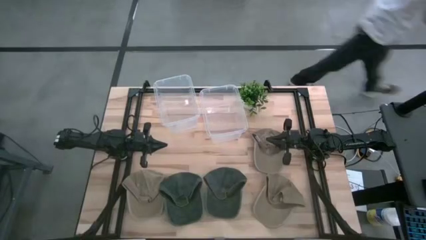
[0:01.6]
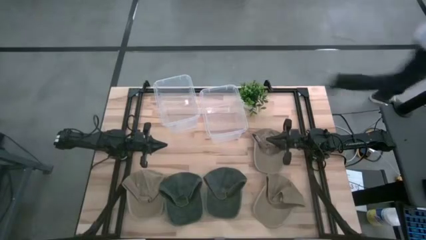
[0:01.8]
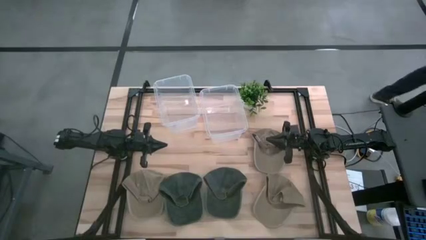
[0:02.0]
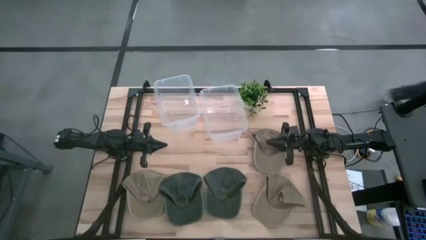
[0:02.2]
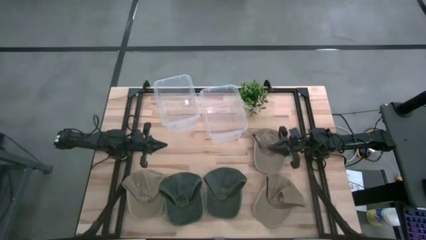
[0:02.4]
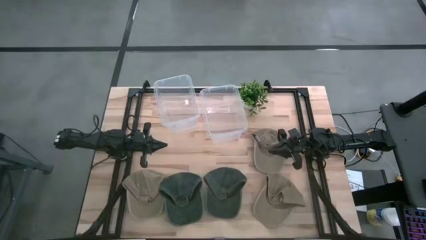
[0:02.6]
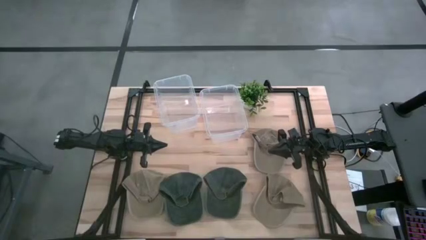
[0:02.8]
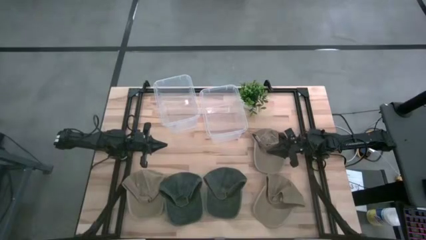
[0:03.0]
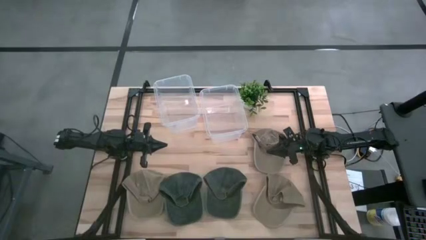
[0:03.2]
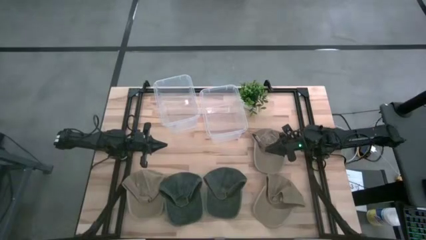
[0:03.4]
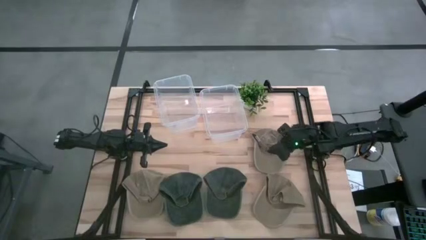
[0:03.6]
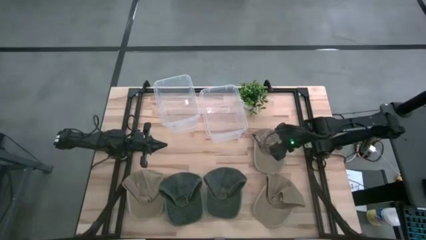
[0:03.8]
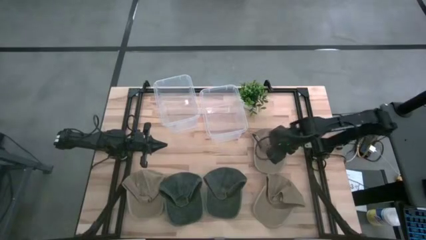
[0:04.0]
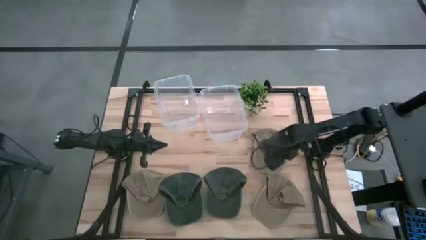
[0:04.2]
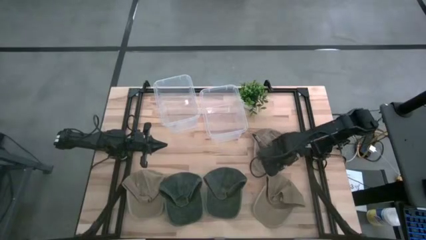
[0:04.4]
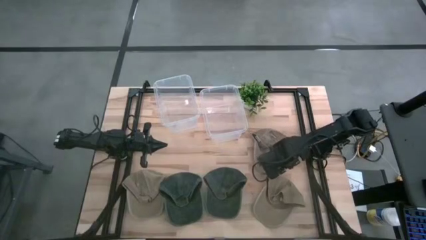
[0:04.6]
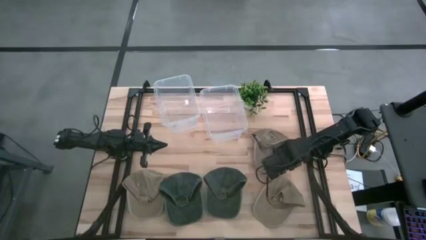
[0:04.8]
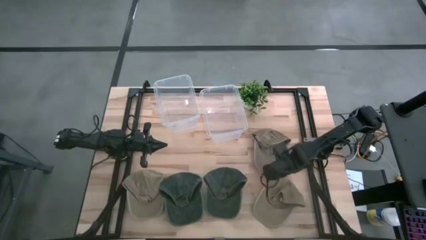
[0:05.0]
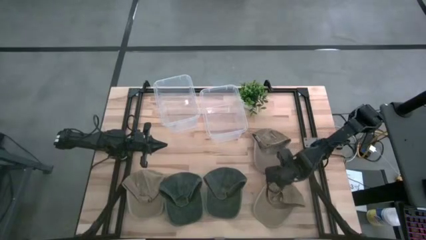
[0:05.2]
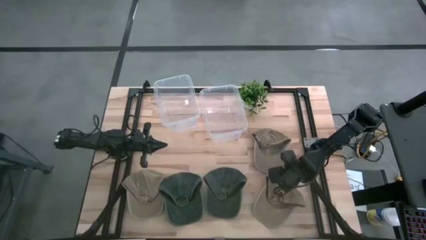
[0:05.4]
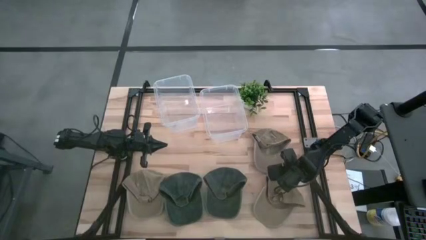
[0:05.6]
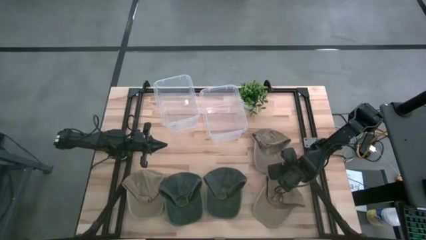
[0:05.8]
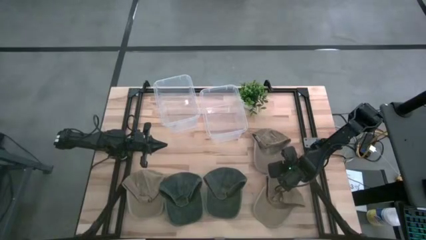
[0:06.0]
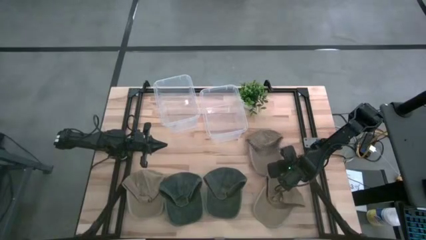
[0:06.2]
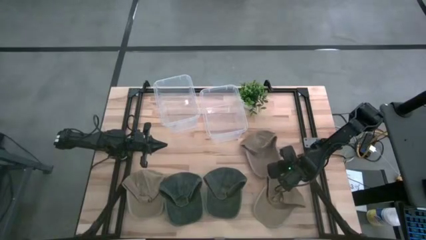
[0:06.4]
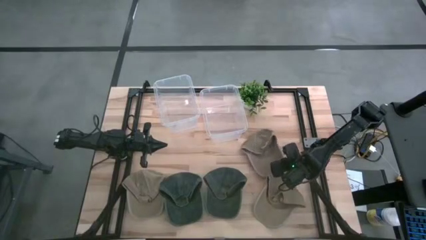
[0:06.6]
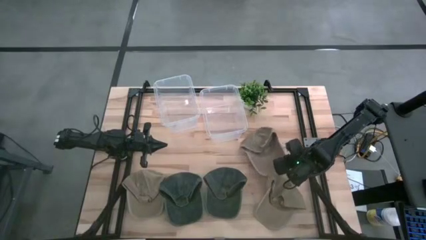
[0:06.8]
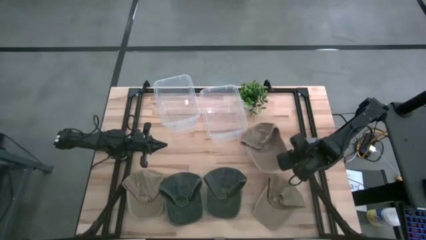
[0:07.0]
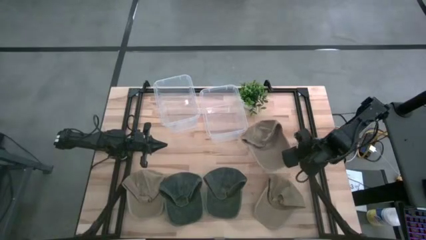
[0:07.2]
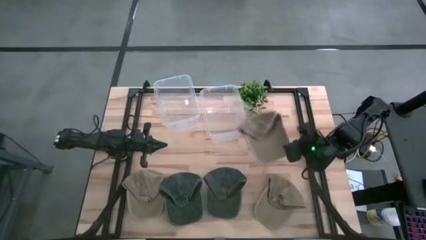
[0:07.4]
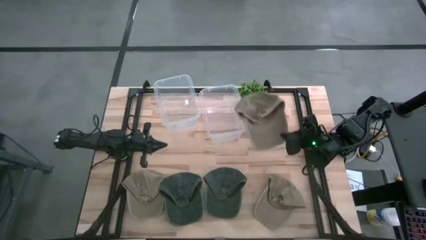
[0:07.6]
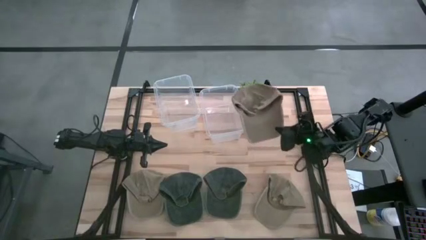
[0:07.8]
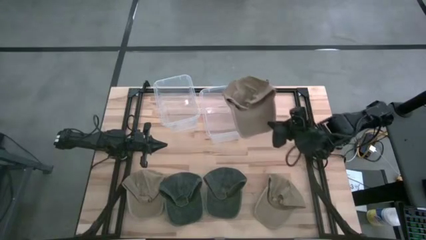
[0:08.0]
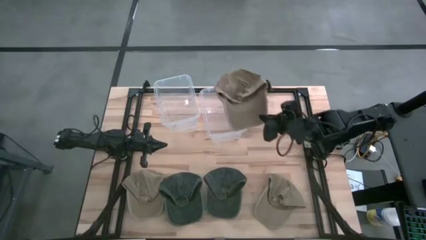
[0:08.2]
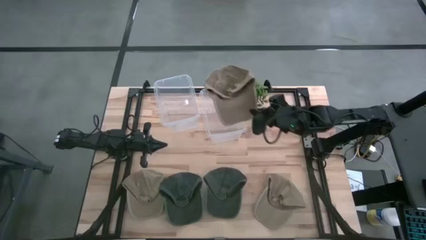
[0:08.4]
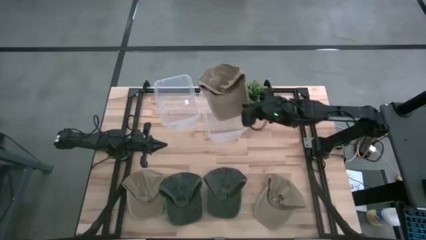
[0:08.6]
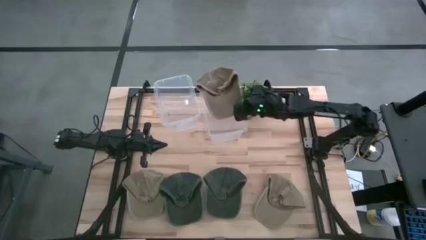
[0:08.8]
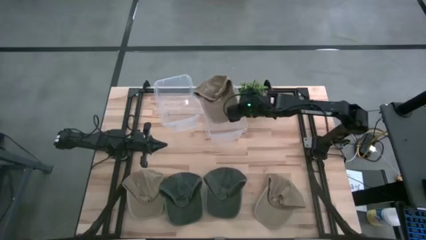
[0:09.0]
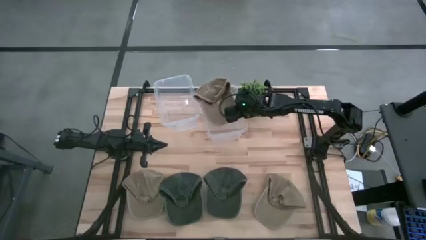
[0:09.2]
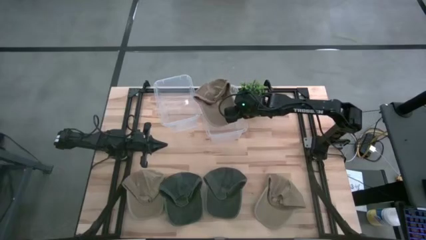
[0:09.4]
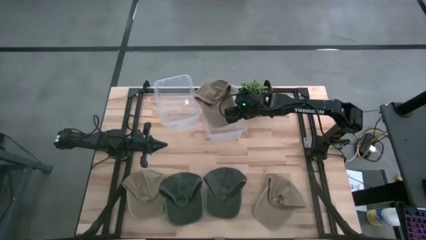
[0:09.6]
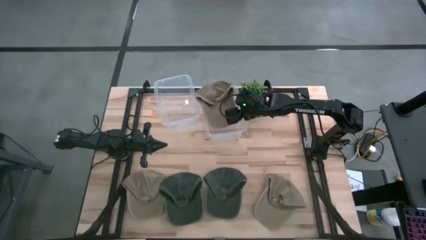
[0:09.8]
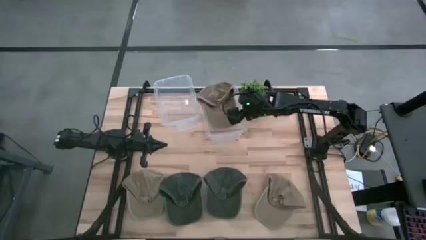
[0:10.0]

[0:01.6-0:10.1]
Task: Pick & Place hat
Put the top brown cap into the right transparent bin

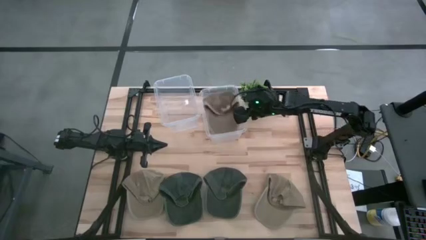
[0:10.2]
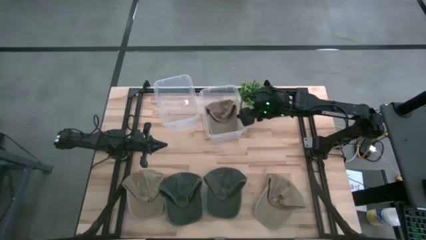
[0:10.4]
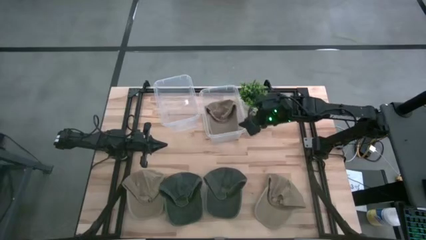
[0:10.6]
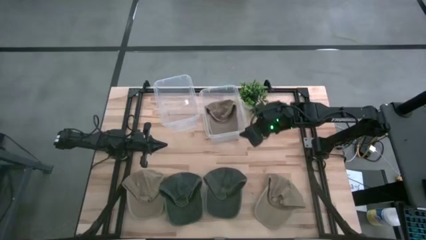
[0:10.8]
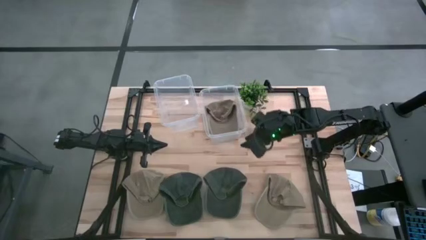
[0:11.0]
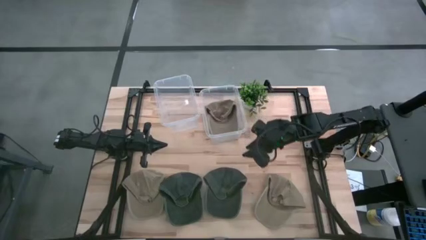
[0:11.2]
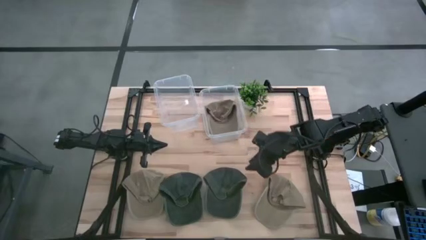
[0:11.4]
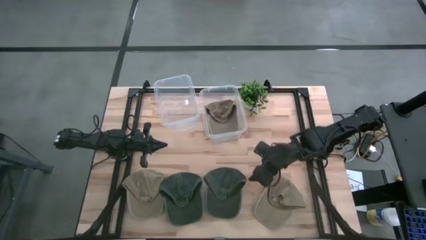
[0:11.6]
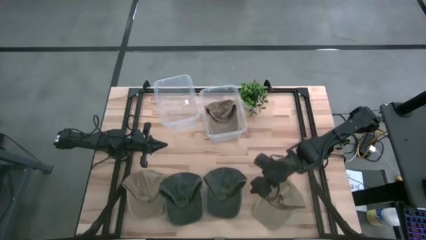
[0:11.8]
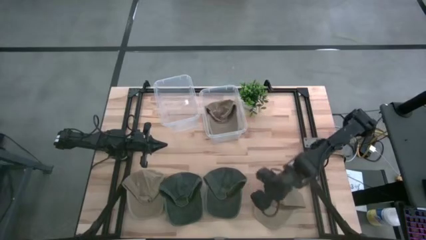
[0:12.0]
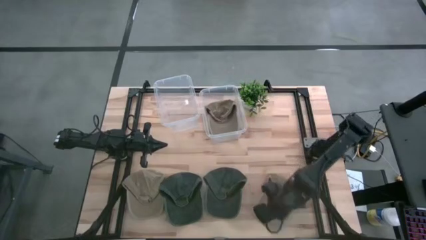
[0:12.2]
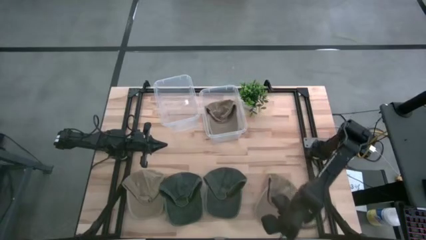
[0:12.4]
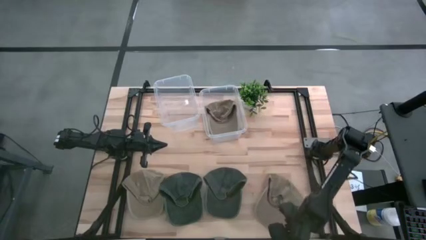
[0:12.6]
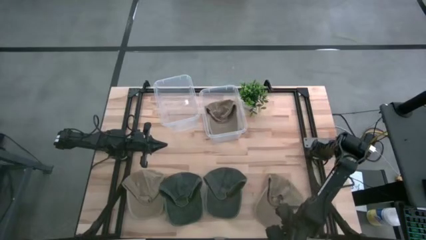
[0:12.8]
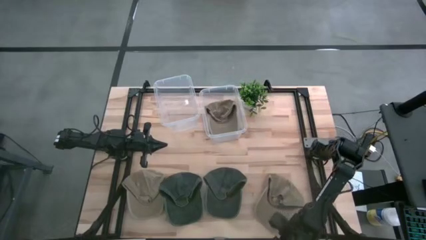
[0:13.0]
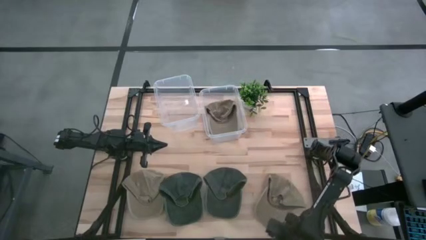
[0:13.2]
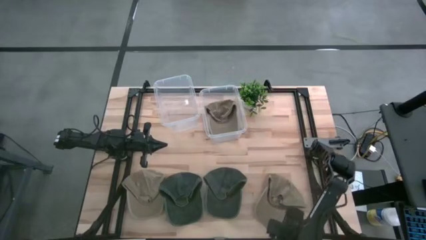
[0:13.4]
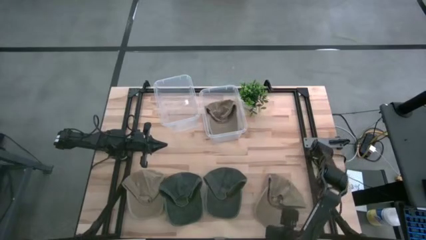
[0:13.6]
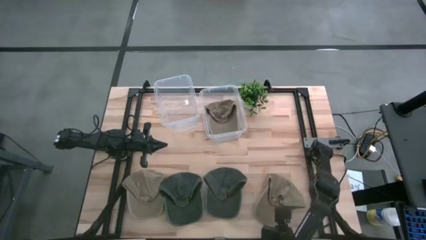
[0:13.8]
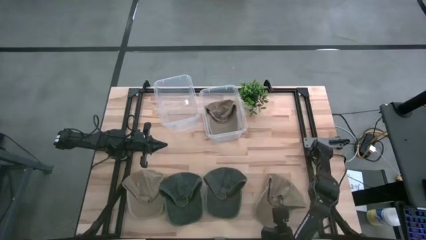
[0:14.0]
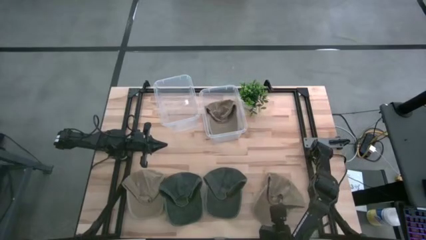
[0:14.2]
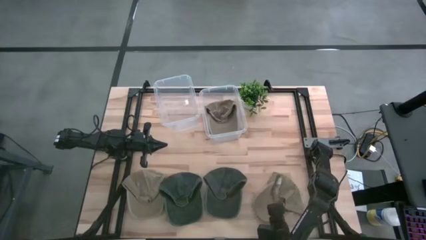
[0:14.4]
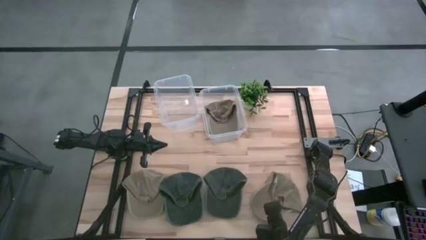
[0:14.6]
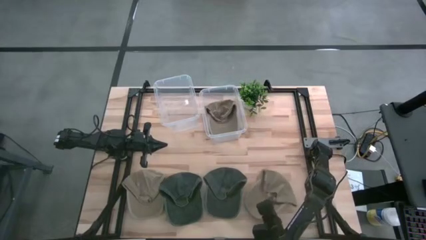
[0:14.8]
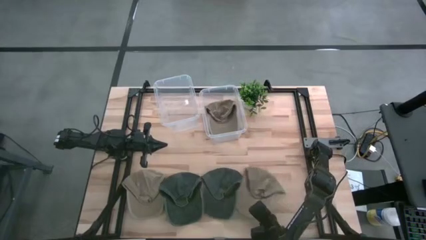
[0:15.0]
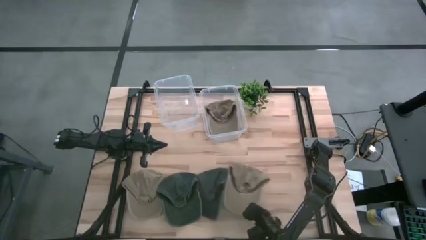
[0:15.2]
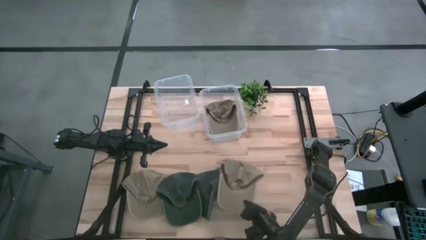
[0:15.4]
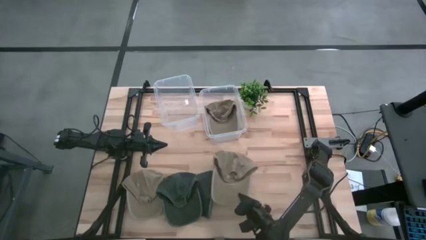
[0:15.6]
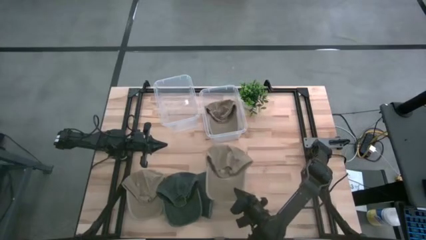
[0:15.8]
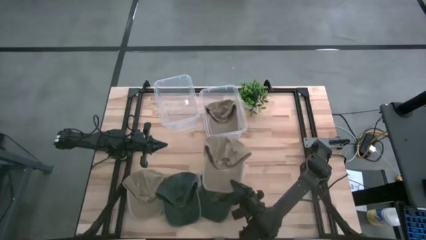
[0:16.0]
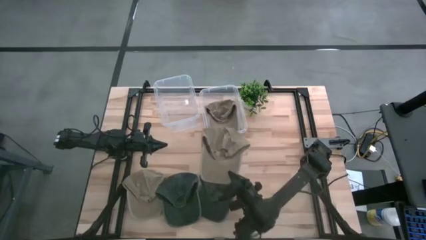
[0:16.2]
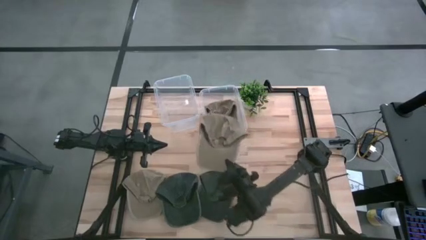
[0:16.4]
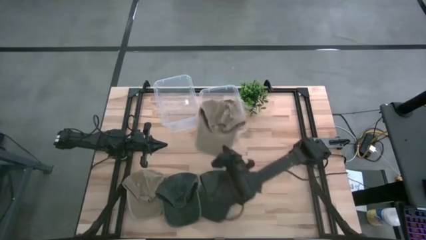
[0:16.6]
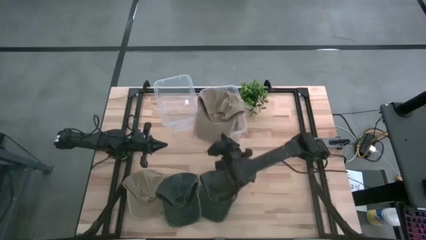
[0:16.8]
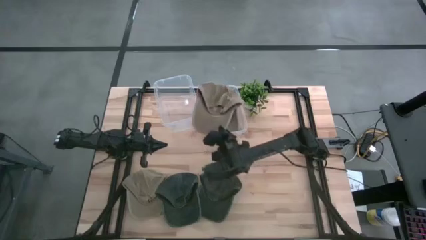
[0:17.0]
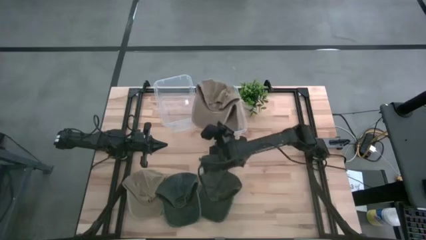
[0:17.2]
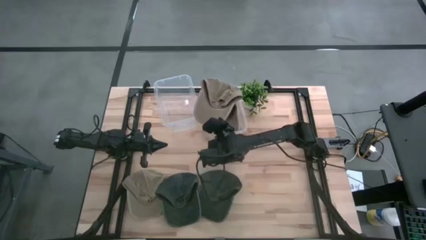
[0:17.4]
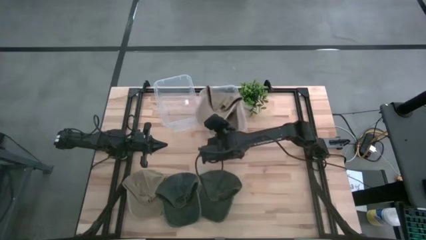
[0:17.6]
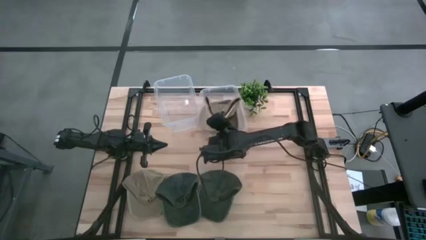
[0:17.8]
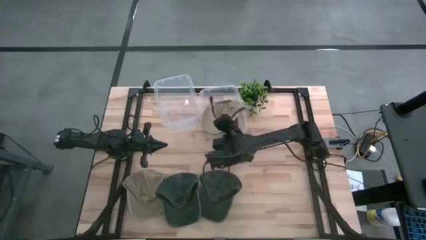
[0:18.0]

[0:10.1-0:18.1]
Put the right brown cap into the right transparent bin
